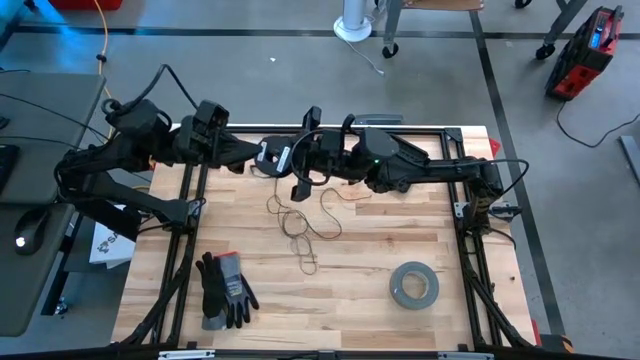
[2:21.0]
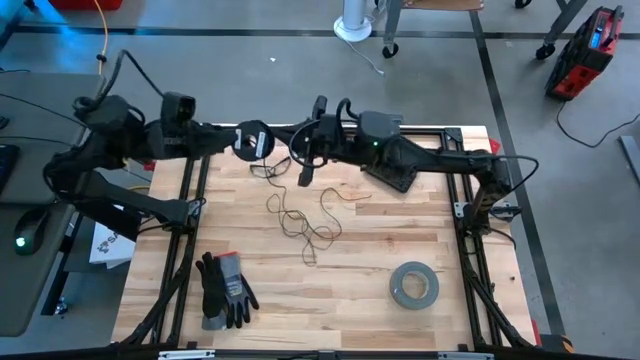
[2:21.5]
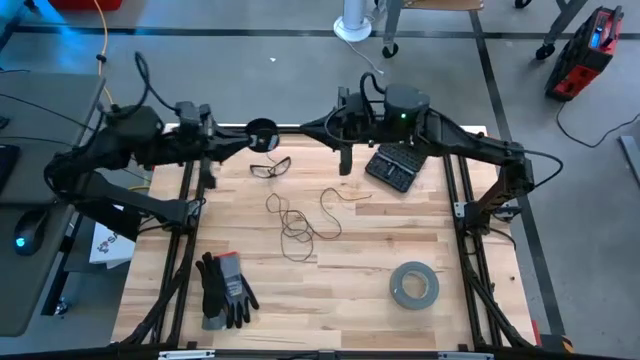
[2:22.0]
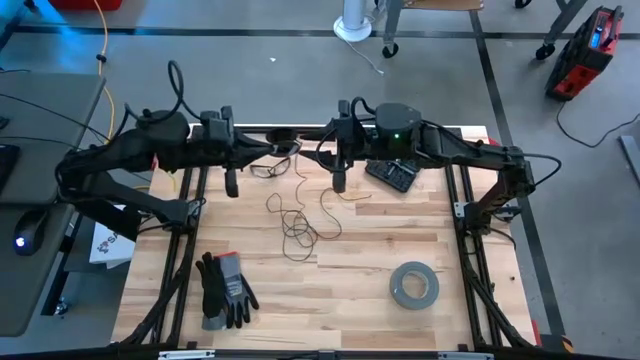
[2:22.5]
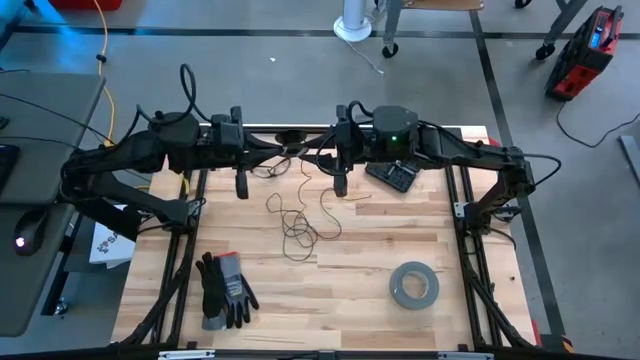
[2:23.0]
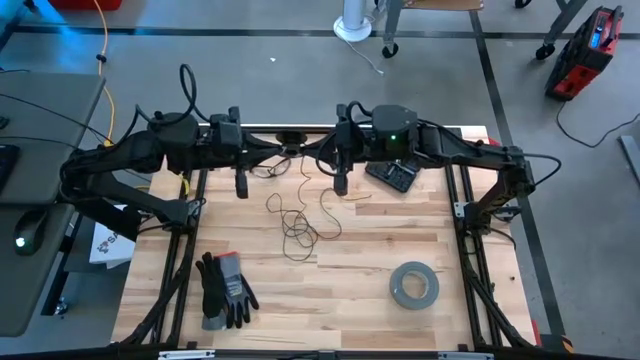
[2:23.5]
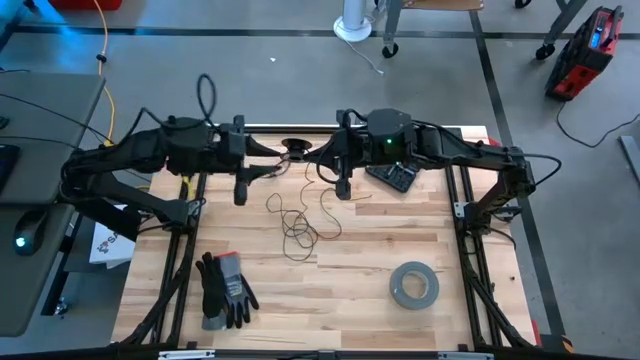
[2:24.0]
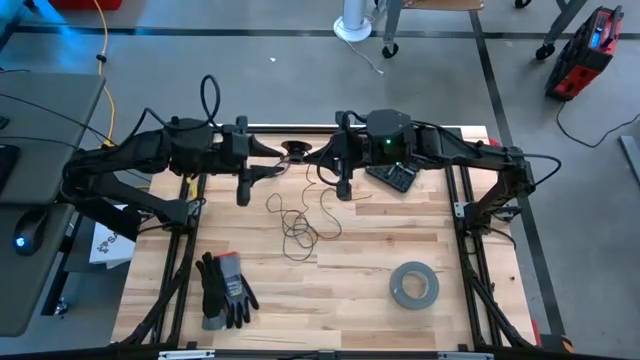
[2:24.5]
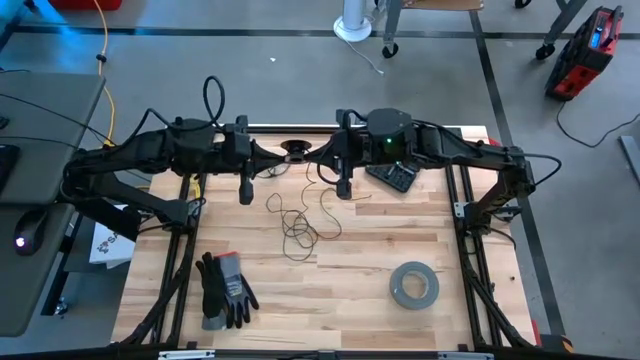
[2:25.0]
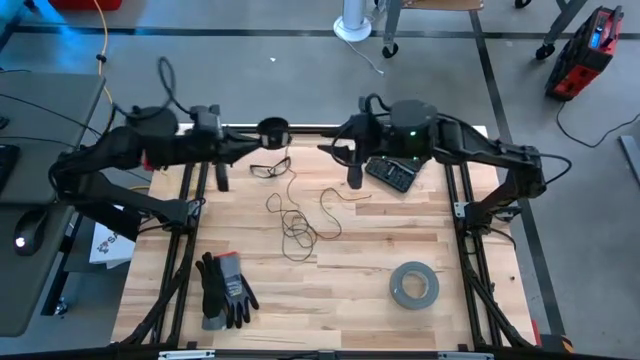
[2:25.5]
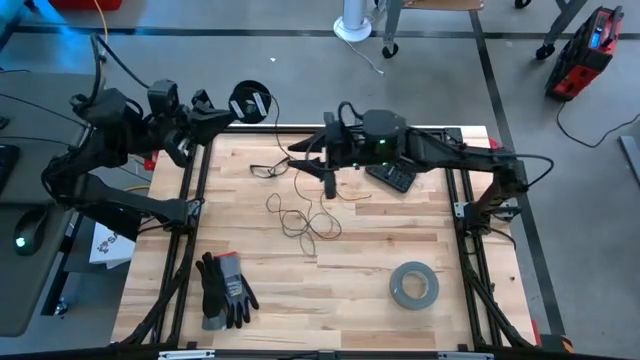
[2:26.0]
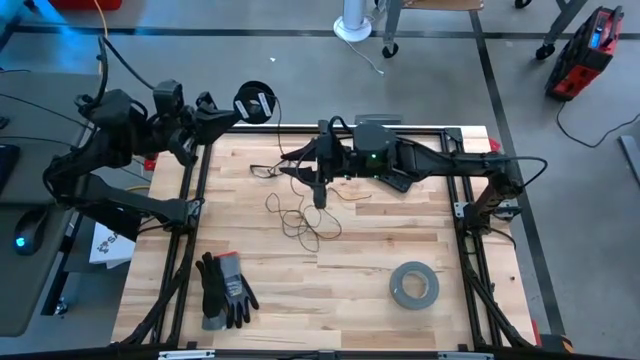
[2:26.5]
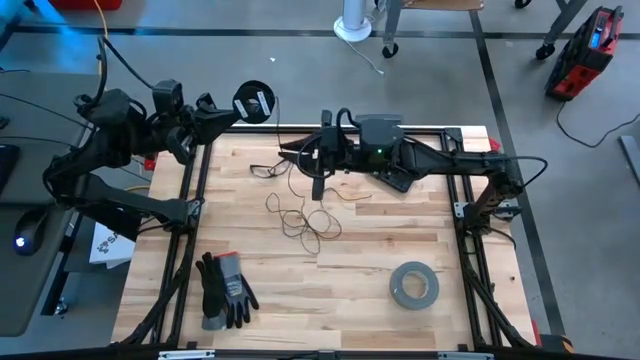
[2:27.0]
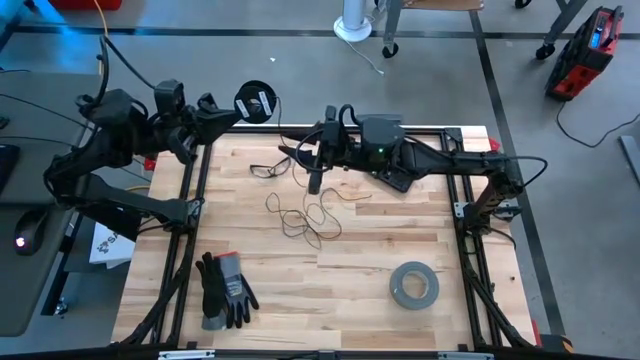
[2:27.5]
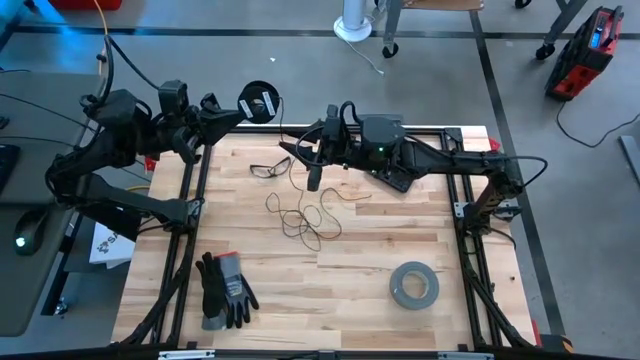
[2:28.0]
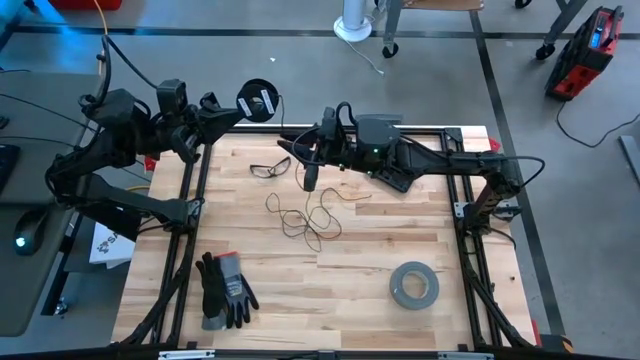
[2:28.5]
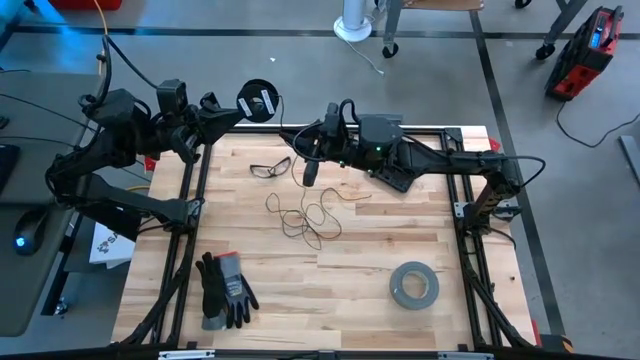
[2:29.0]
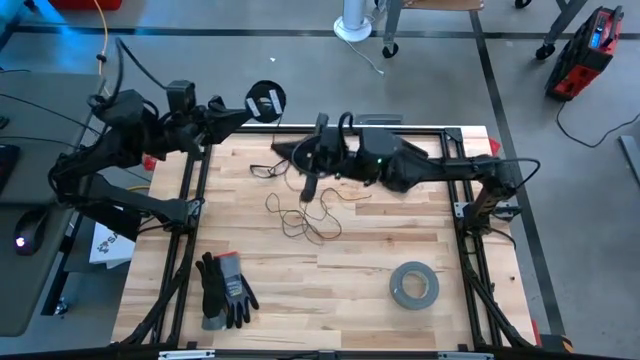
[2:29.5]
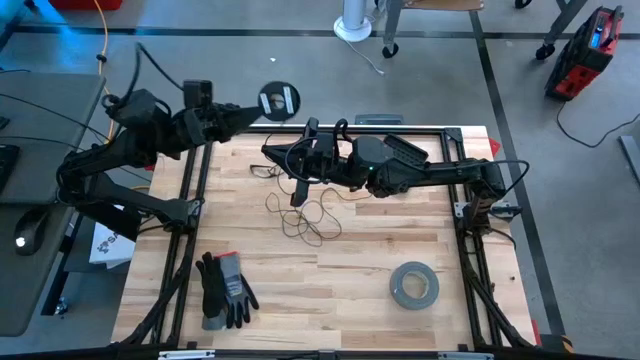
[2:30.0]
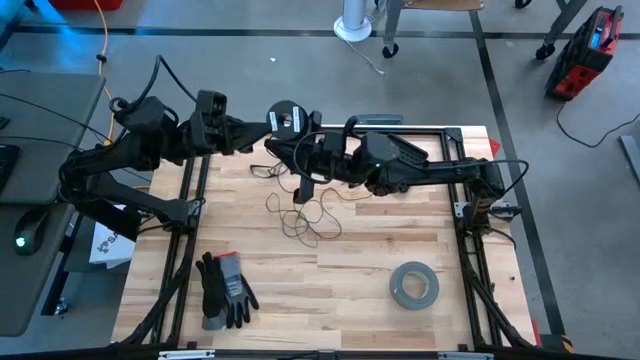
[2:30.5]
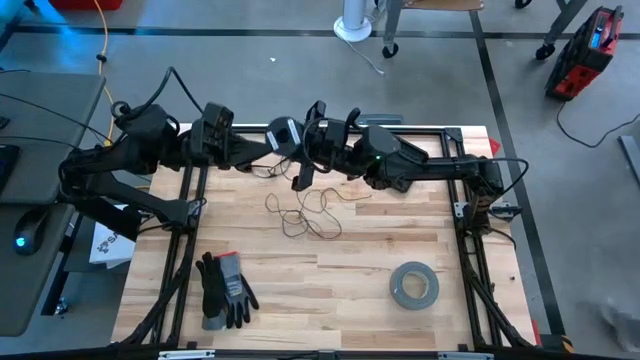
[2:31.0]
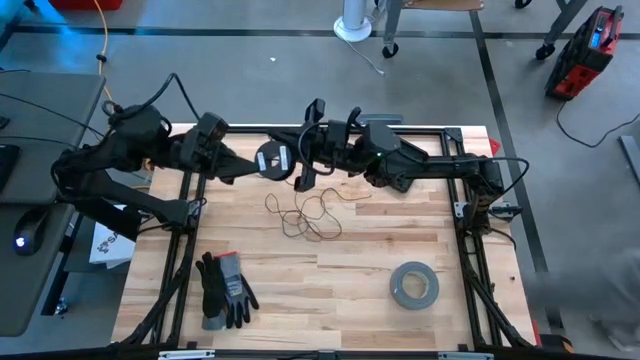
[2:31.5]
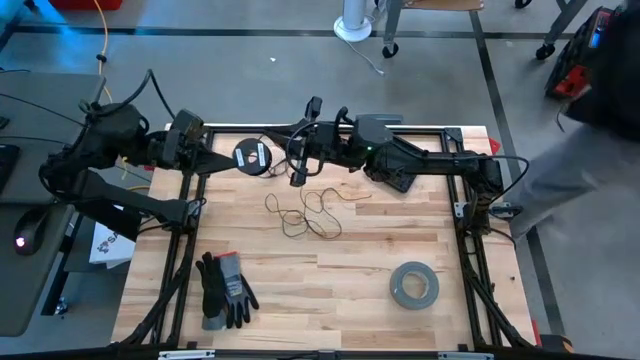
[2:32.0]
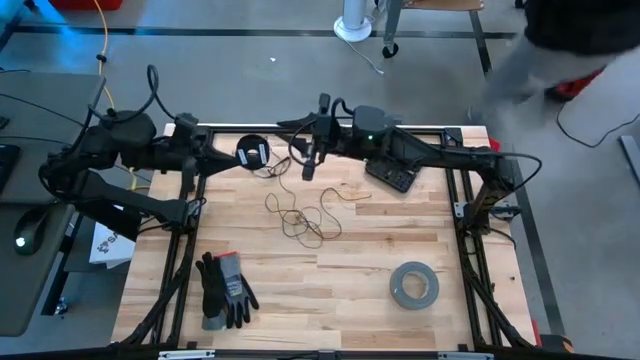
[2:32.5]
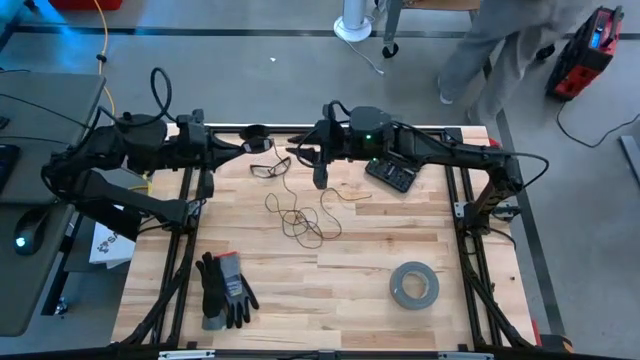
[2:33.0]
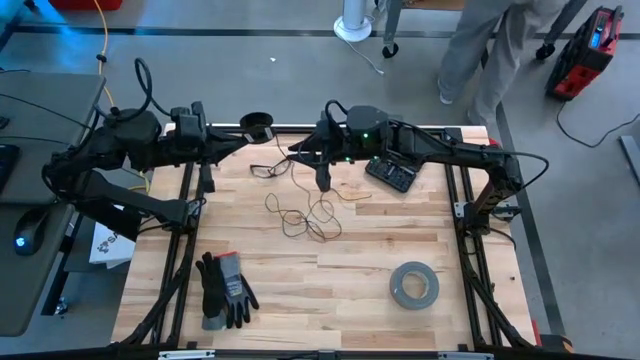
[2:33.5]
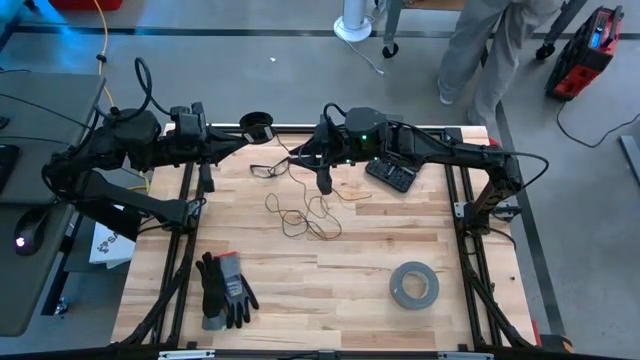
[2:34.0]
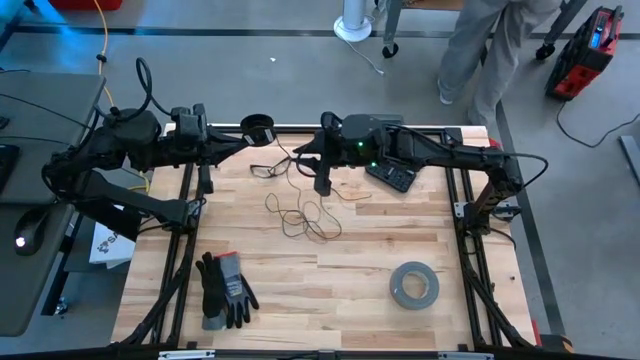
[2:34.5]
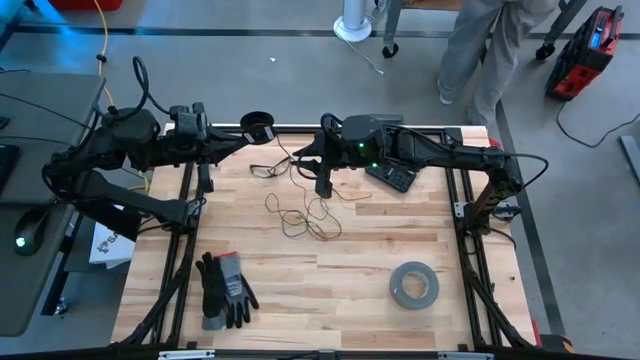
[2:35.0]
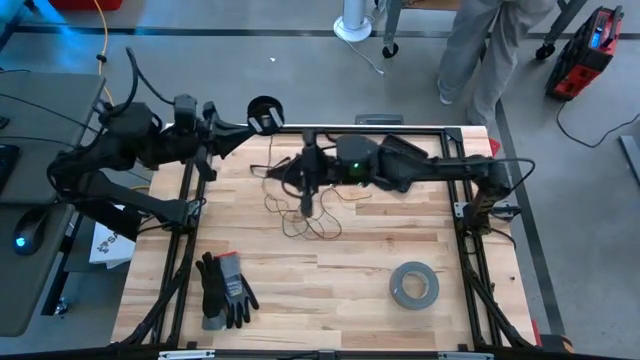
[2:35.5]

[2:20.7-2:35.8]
Task: Coil cords
Coil the black wire on the black spool

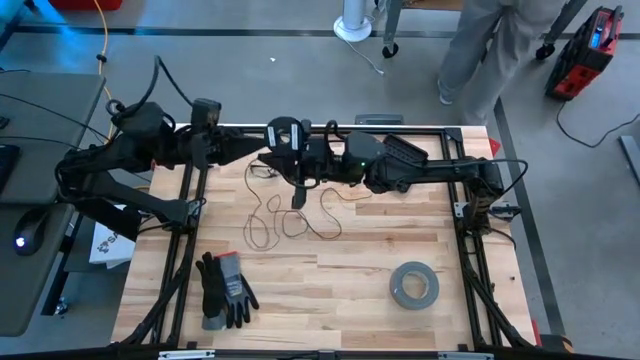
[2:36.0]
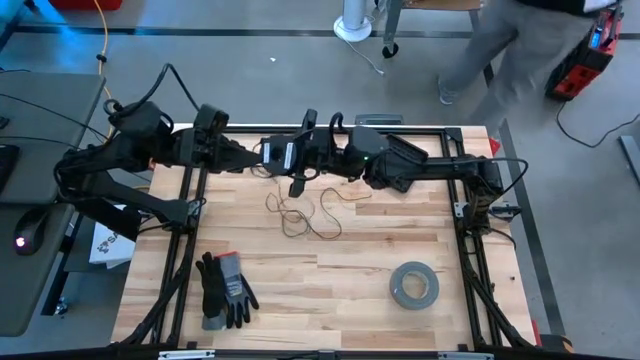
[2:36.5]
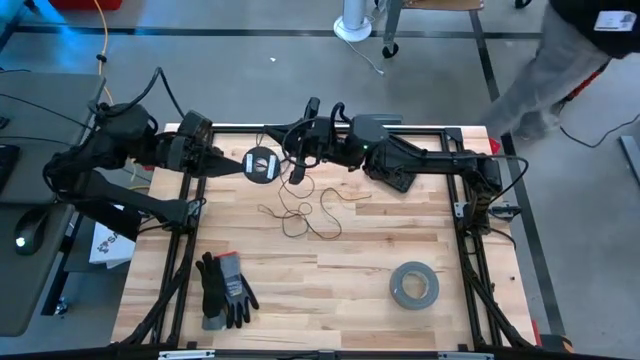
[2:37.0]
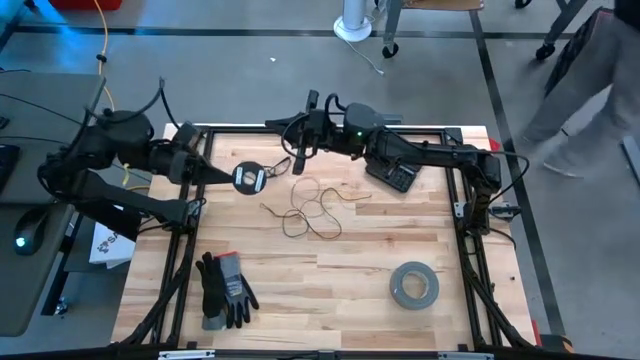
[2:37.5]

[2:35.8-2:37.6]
Coil the black wire on the black spool
